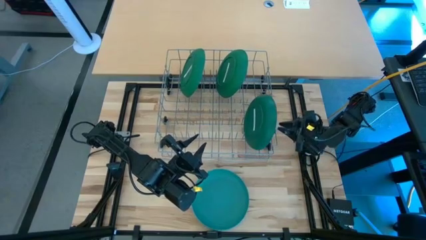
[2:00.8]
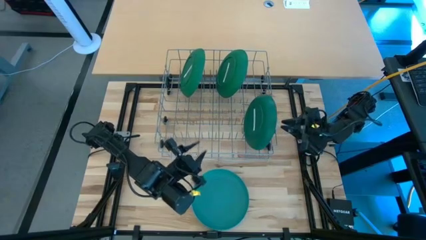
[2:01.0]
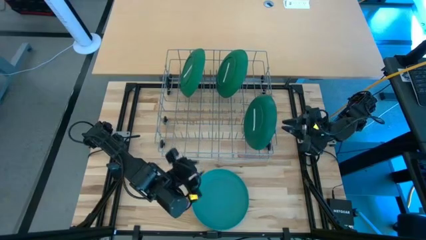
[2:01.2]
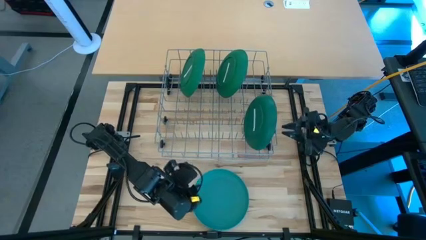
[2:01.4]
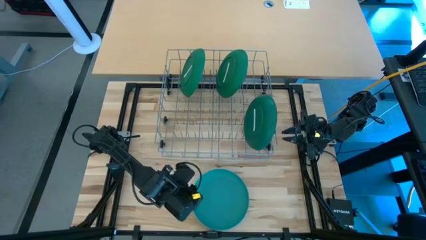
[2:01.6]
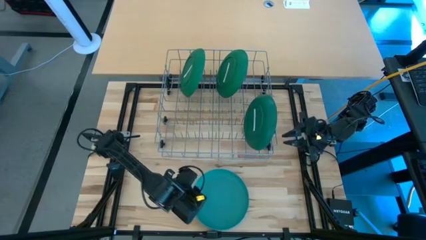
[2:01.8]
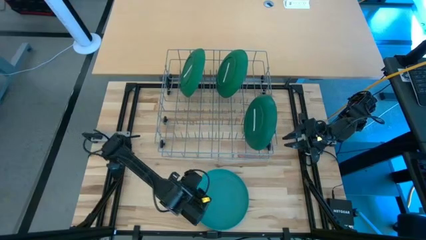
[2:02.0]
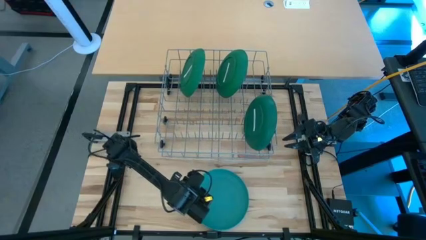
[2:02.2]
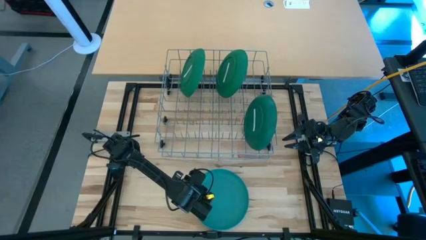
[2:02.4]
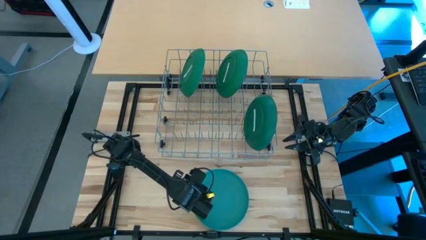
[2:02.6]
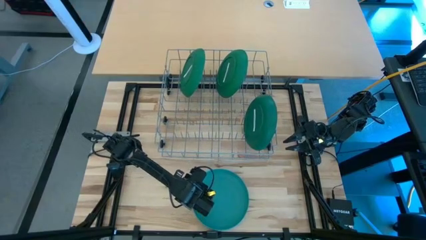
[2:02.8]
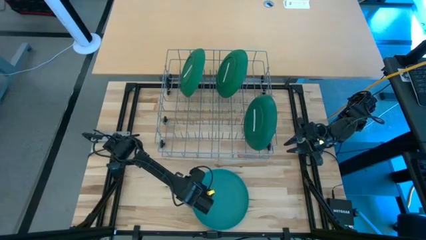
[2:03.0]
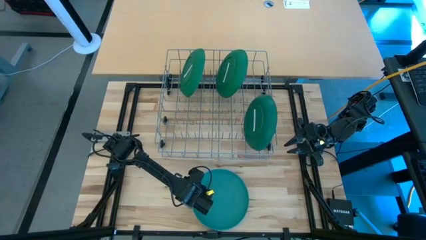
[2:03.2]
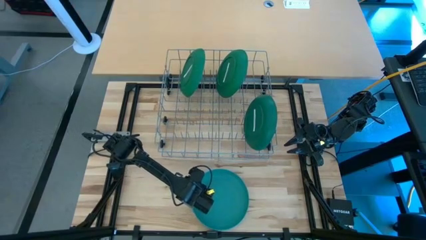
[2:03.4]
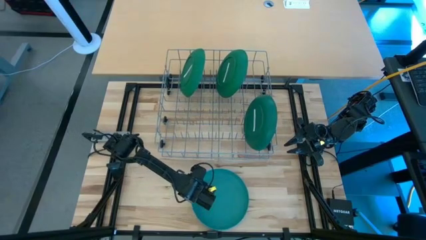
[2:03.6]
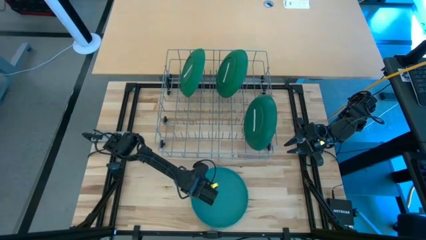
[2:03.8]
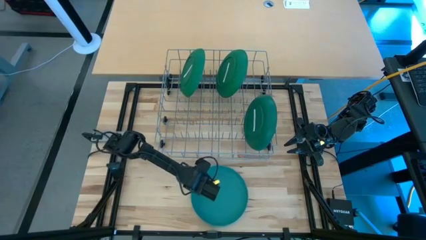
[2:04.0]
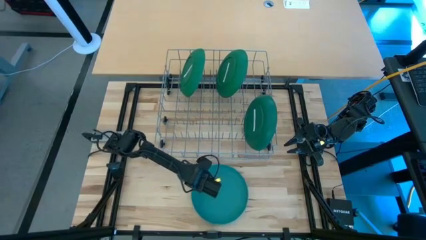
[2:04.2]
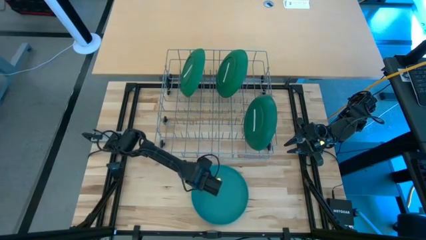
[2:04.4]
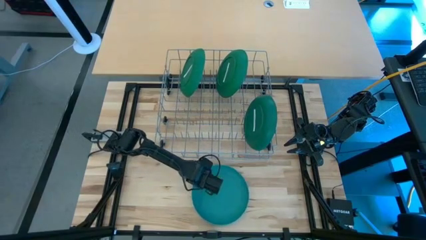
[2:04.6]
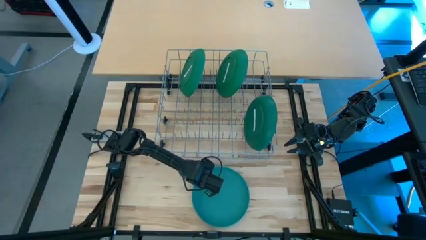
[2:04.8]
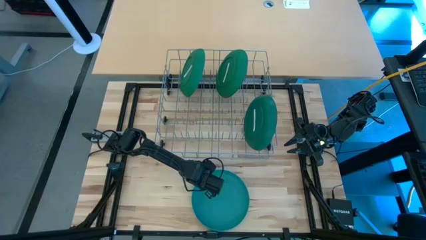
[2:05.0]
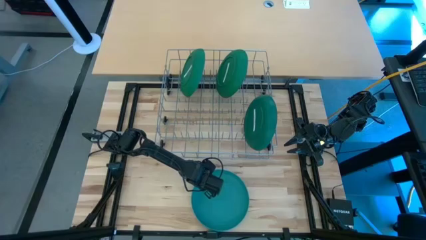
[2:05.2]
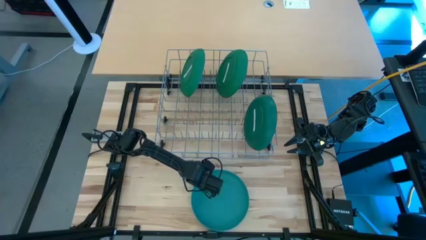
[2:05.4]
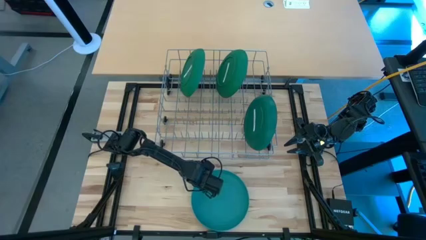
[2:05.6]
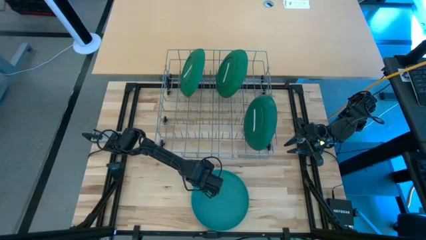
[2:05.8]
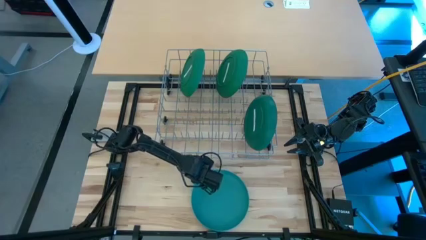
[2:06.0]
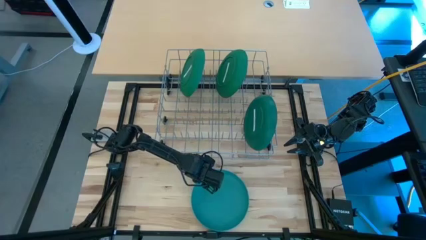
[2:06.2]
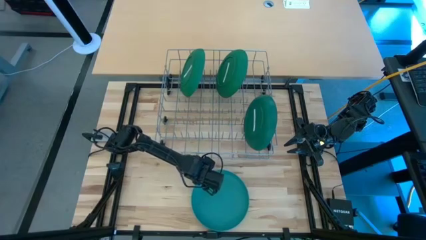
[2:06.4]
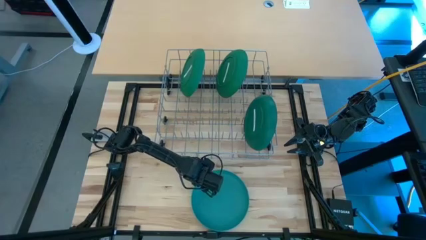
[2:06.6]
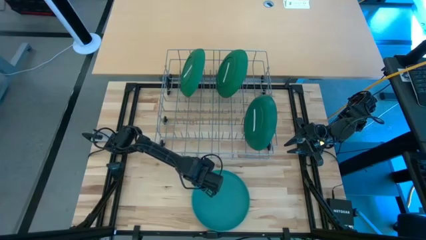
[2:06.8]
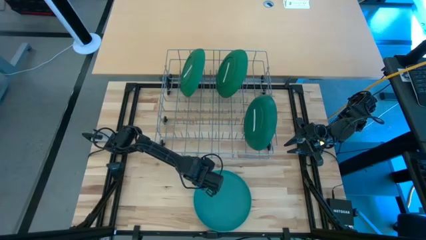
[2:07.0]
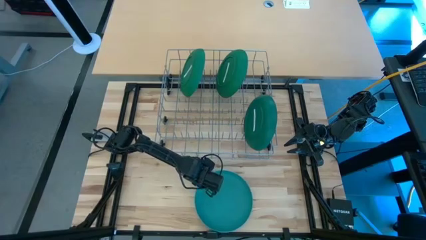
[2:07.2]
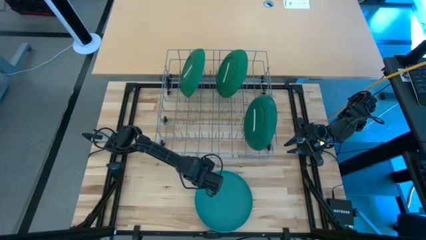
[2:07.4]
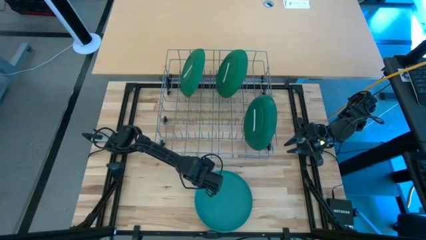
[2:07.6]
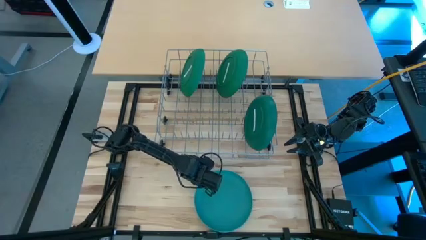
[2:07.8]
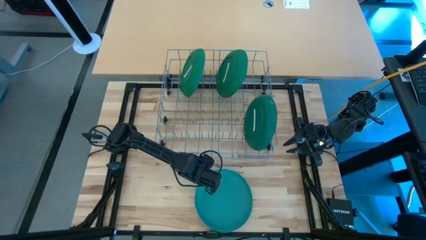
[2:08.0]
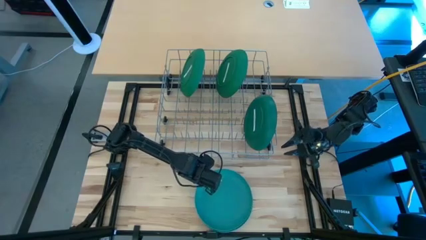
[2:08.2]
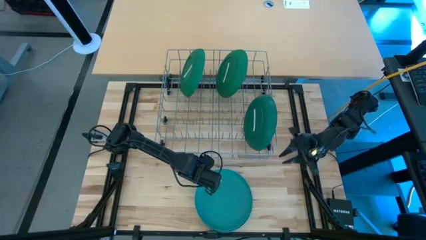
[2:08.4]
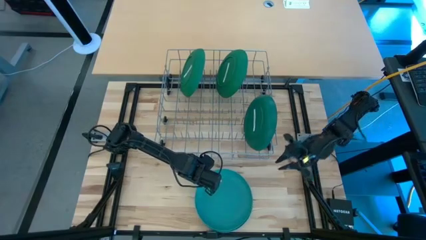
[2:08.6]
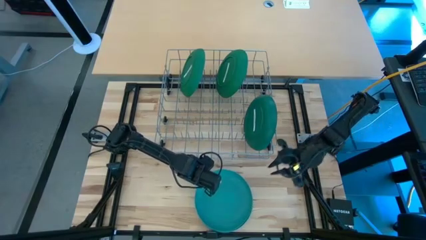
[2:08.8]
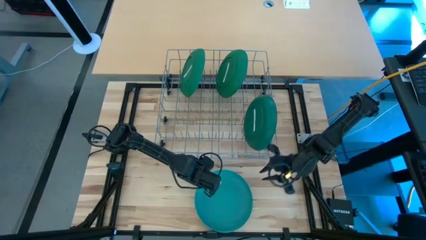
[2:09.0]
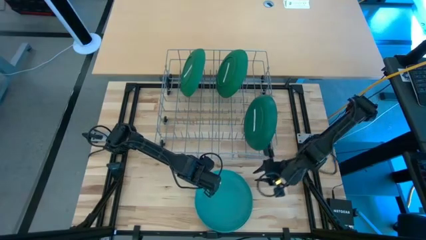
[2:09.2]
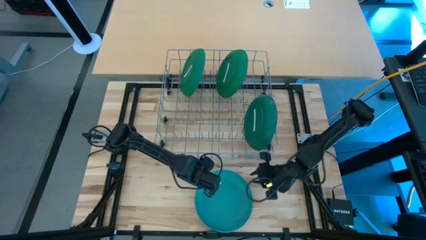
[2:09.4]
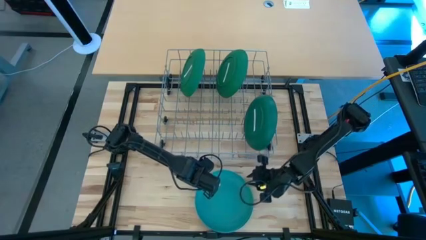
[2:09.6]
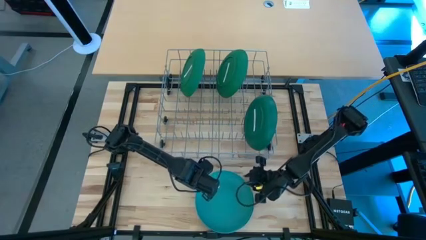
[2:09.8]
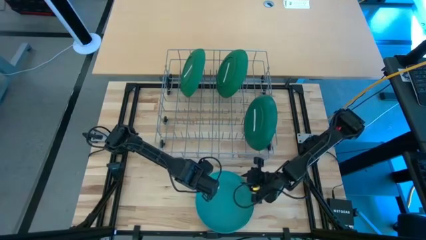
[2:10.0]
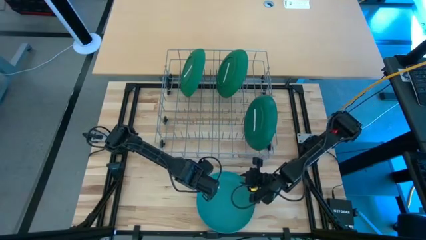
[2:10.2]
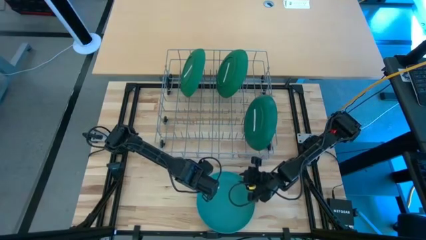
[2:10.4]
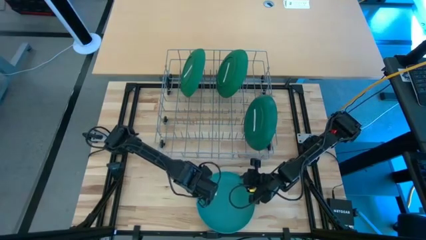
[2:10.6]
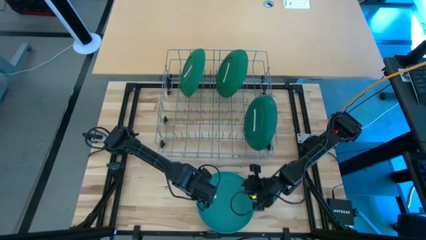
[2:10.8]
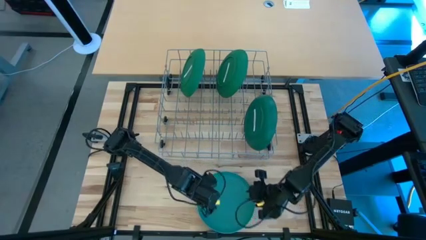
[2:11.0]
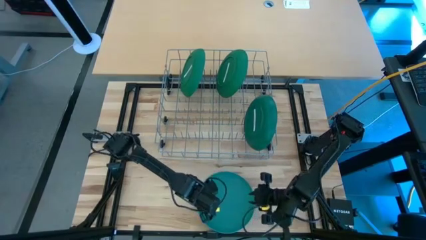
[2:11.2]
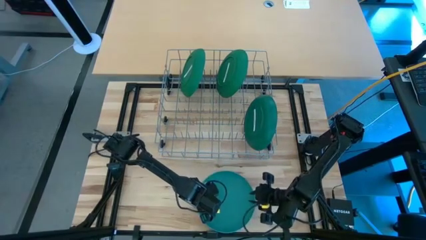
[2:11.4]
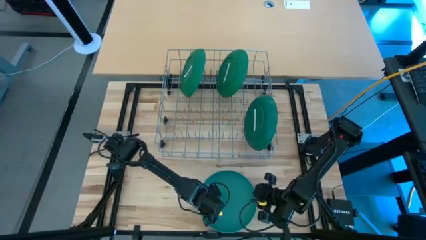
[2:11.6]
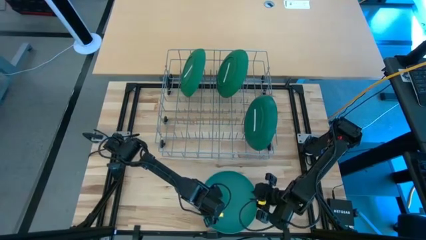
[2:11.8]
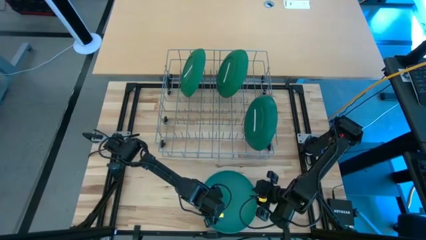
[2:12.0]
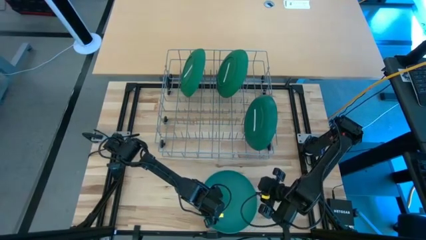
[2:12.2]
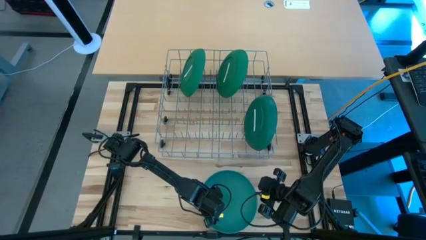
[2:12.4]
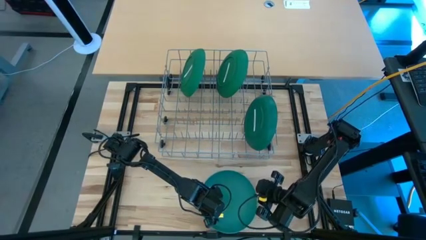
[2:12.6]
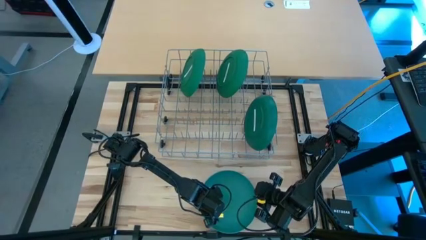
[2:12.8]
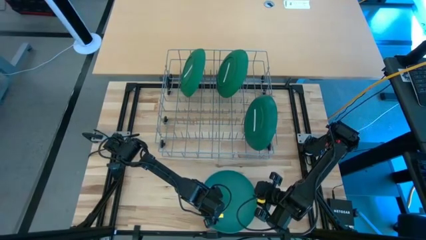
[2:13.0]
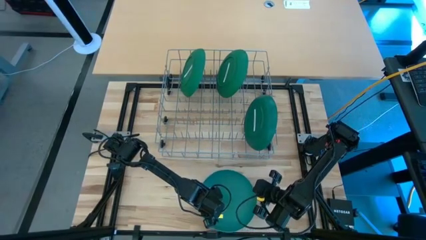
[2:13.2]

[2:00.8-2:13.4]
Task: Sort dishes
Put the top light green plate in the dish rack

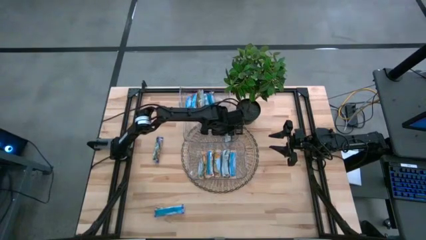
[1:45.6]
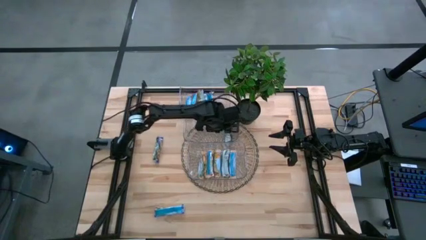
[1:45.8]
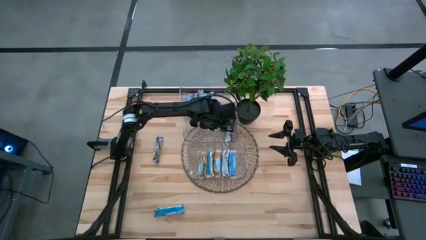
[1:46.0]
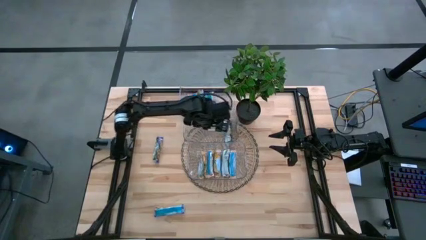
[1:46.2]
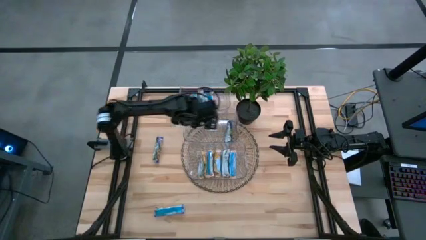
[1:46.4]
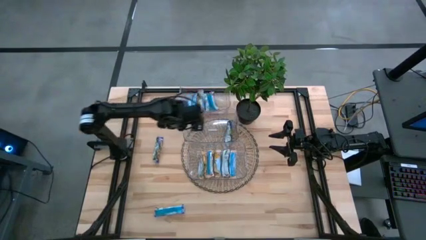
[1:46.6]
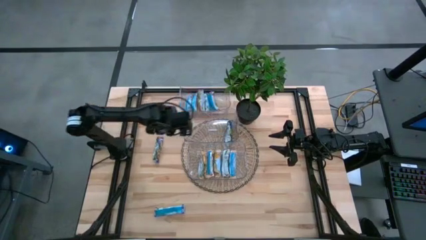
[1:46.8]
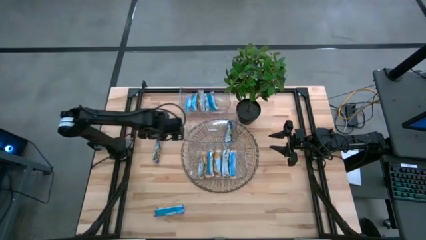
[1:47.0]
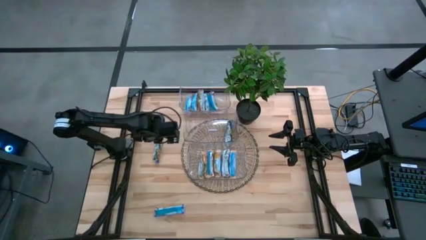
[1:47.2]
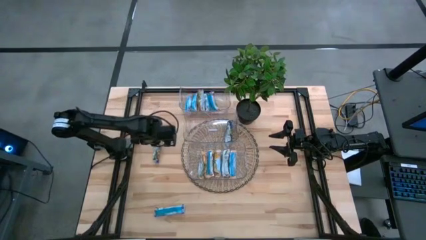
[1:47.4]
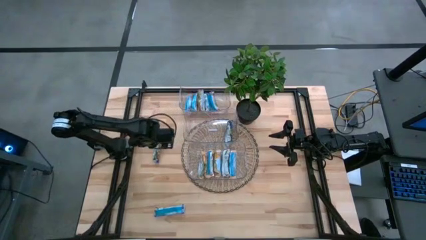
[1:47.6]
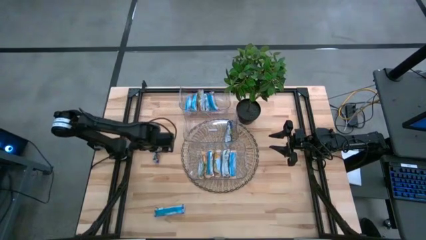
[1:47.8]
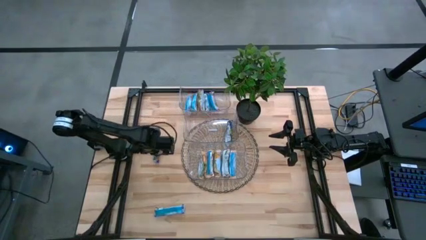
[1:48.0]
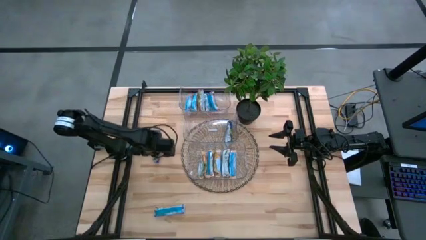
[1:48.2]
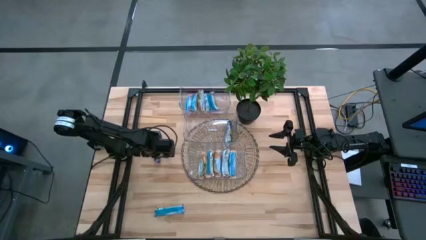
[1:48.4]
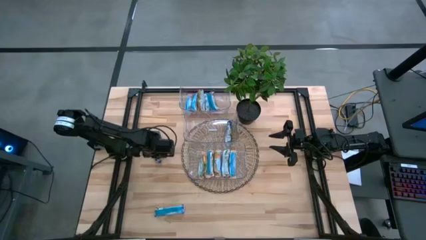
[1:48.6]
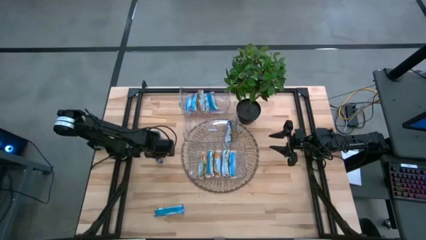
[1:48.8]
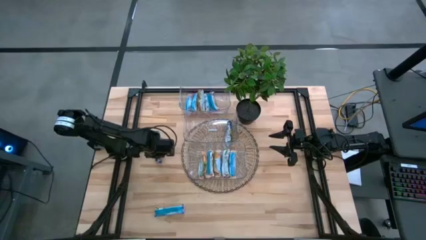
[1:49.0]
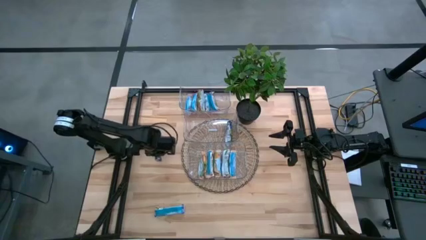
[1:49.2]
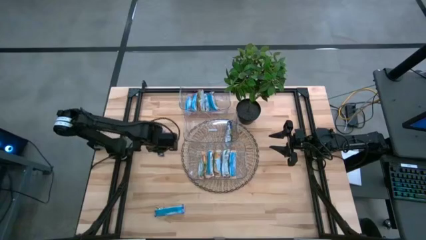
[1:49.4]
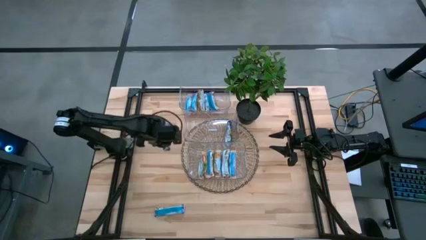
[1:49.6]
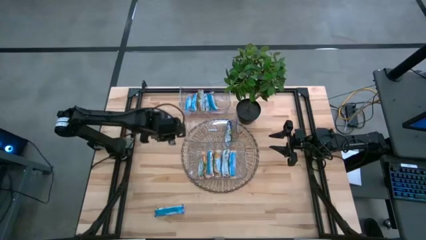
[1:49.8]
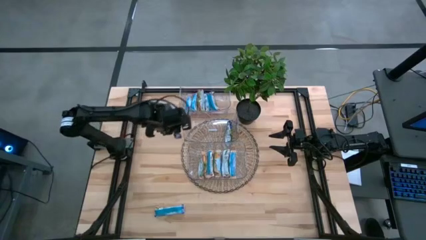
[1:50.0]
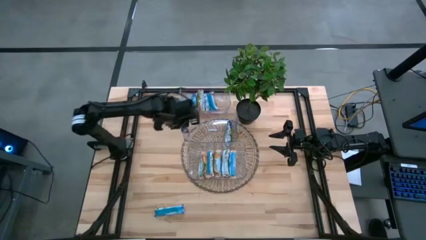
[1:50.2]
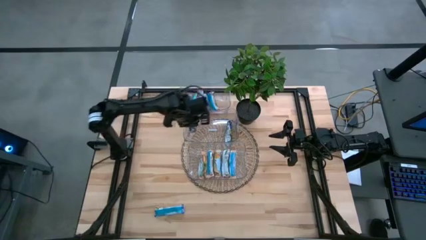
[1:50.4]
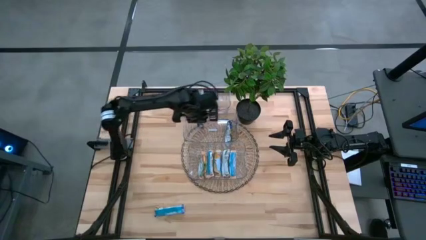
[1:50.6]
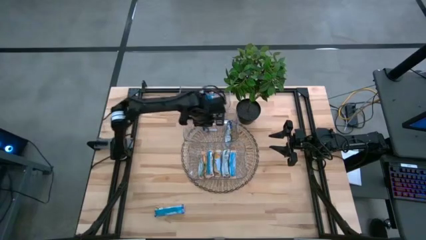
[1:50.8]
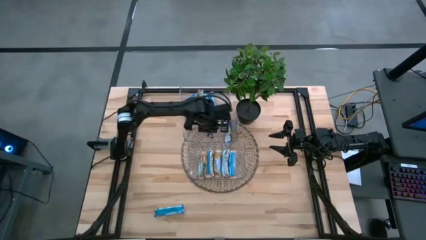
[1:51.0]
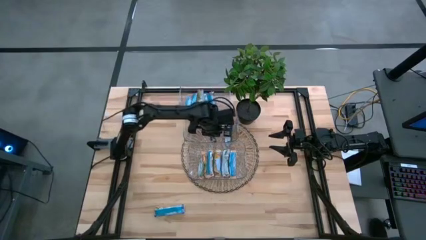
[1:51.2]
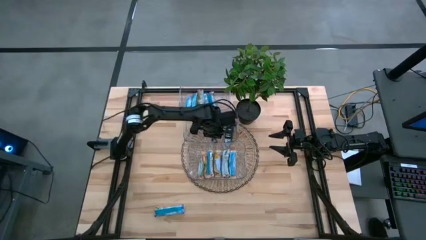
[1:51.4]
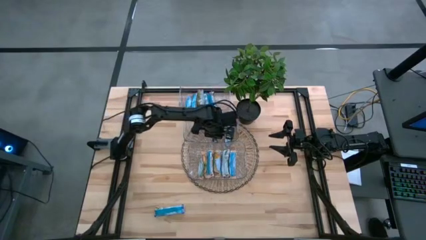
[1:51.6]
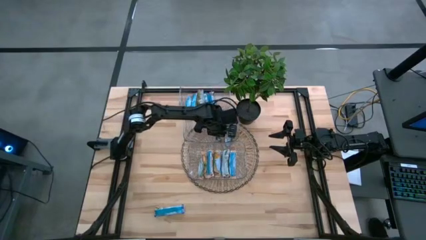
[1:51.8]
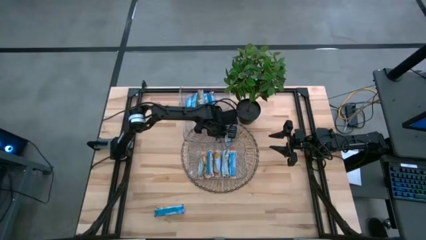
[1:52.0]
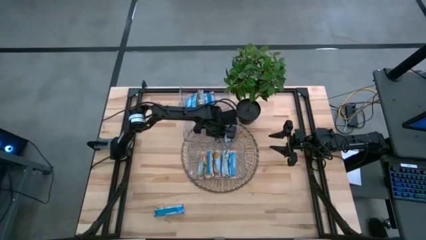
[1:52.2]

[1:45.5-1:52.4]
Task: Pick and place Granola Bars by type
Put the blue granola bar into the middle transparent bin
